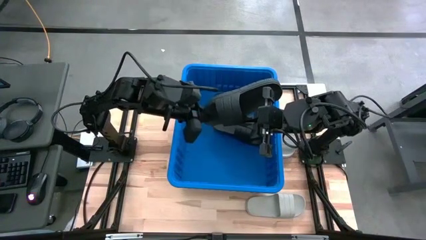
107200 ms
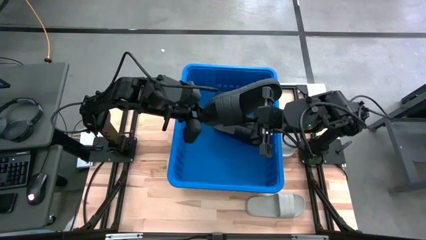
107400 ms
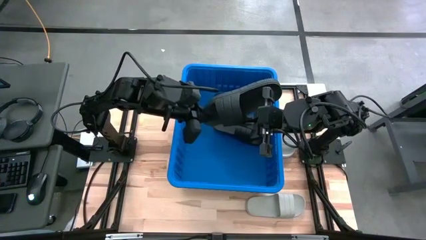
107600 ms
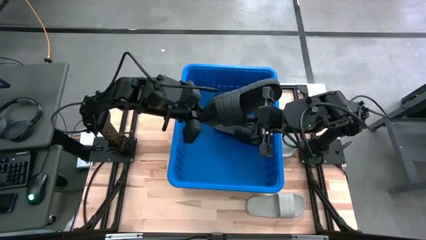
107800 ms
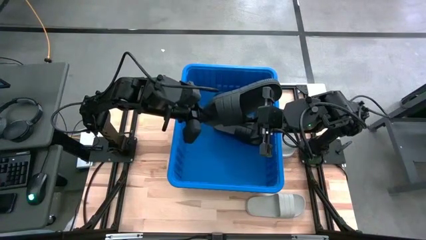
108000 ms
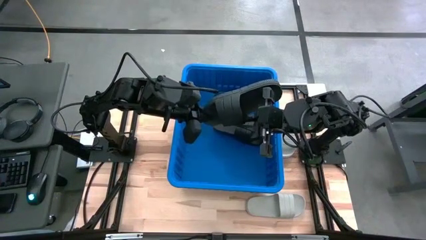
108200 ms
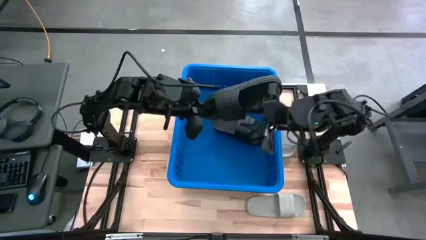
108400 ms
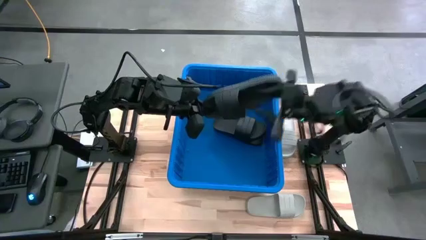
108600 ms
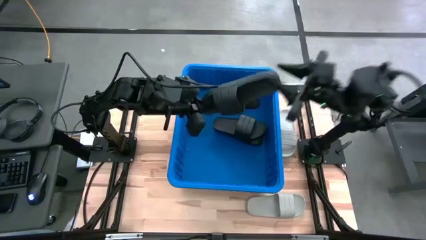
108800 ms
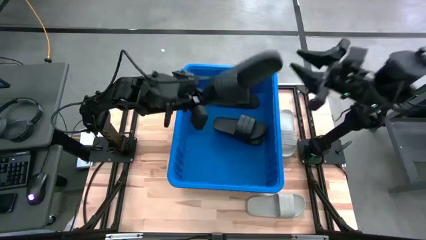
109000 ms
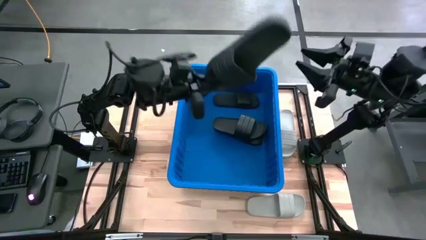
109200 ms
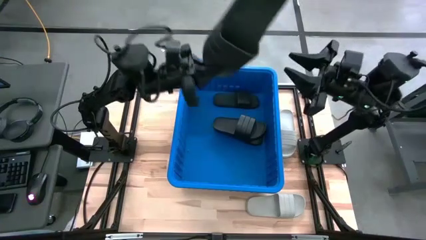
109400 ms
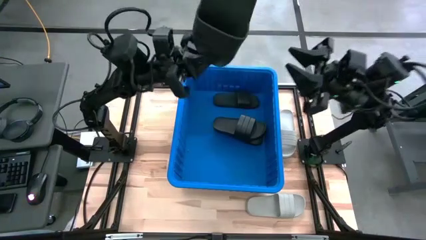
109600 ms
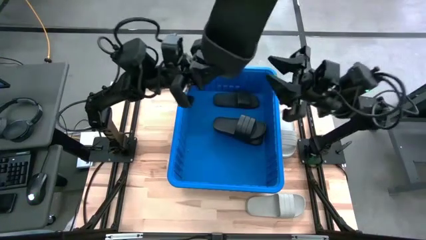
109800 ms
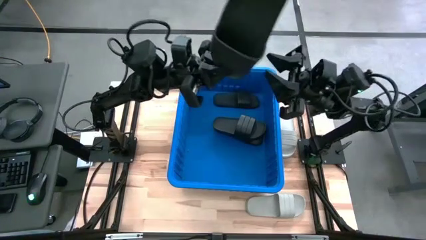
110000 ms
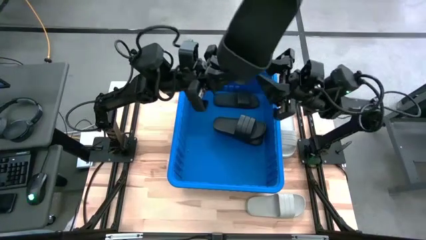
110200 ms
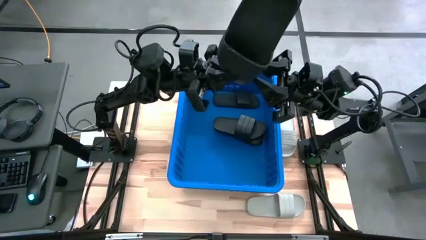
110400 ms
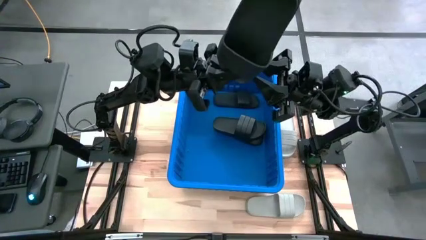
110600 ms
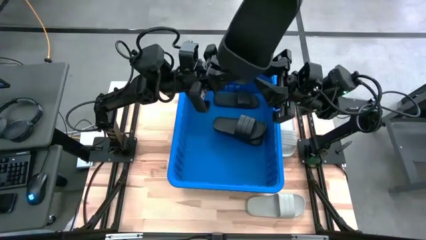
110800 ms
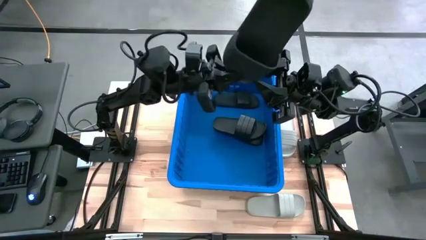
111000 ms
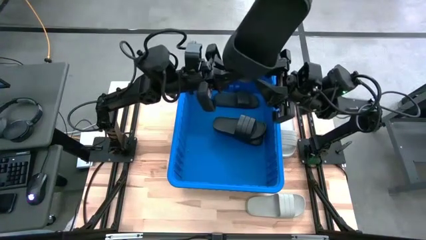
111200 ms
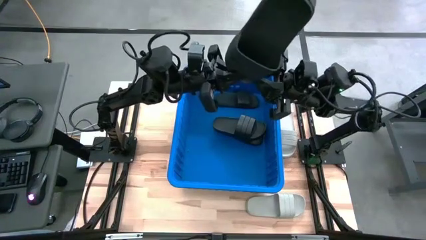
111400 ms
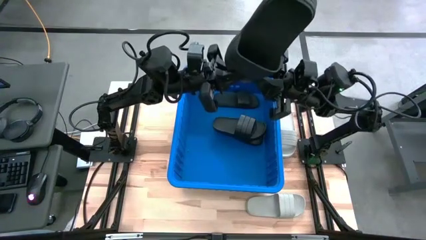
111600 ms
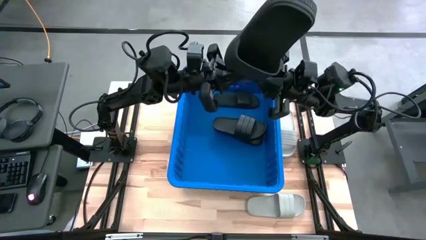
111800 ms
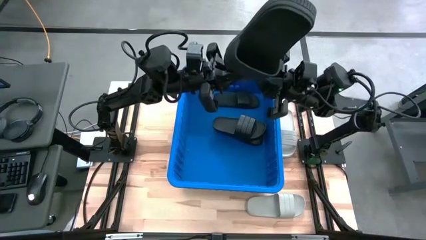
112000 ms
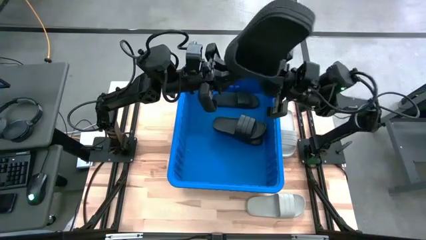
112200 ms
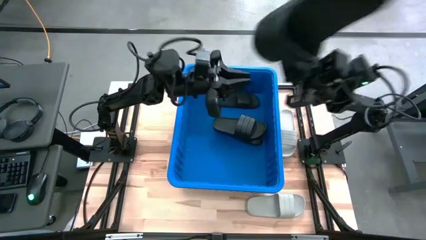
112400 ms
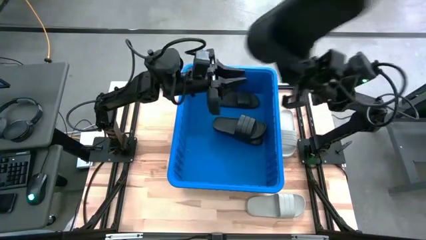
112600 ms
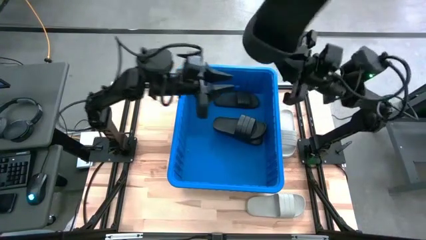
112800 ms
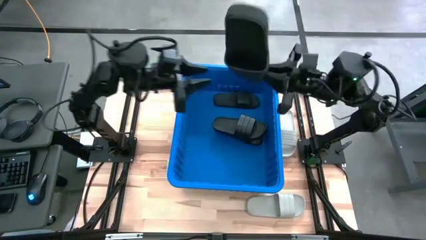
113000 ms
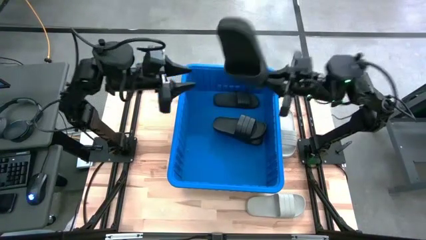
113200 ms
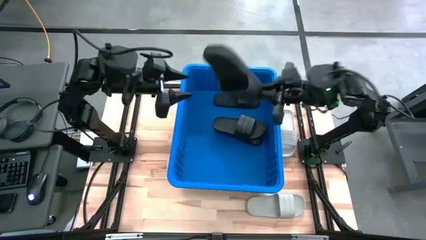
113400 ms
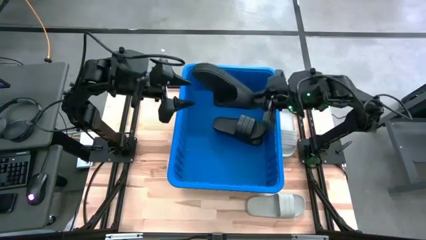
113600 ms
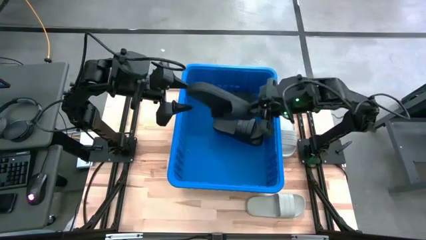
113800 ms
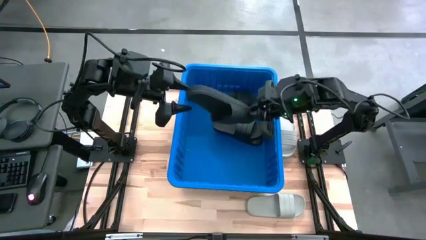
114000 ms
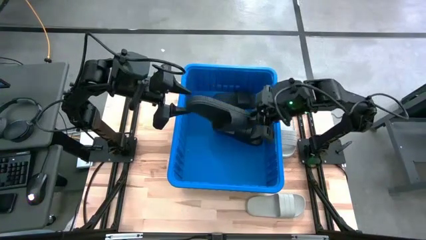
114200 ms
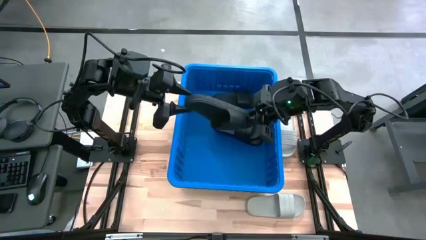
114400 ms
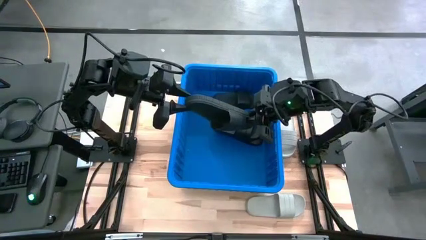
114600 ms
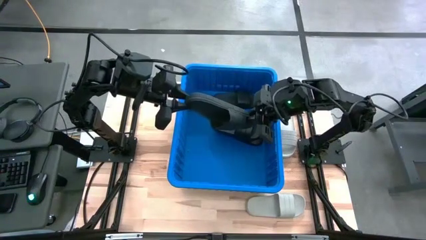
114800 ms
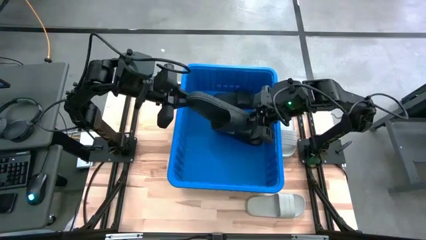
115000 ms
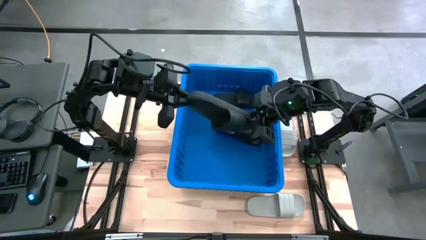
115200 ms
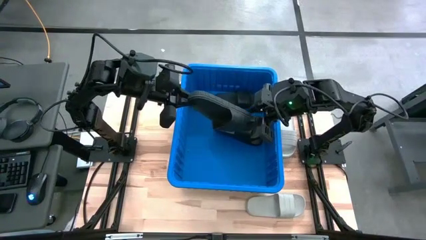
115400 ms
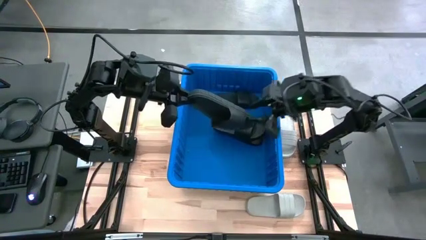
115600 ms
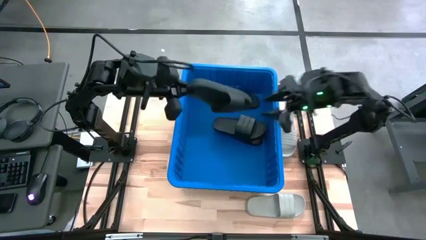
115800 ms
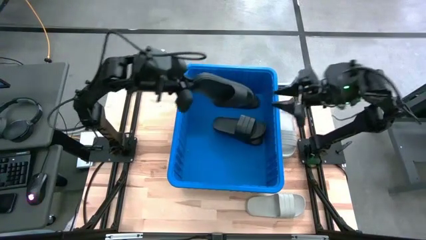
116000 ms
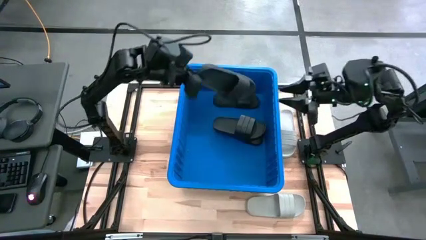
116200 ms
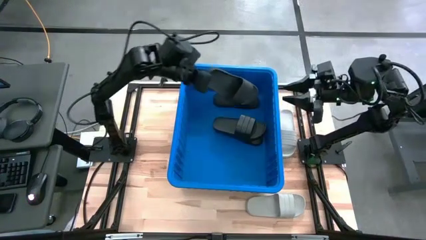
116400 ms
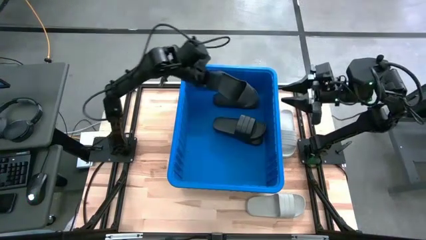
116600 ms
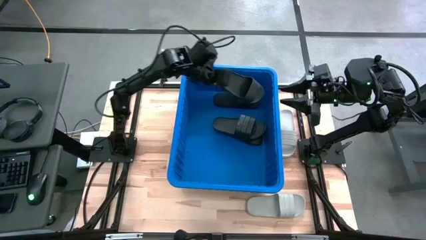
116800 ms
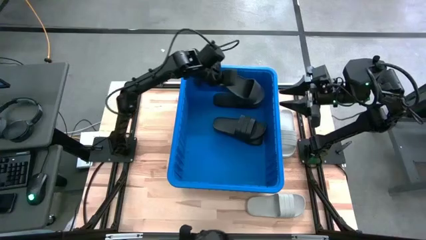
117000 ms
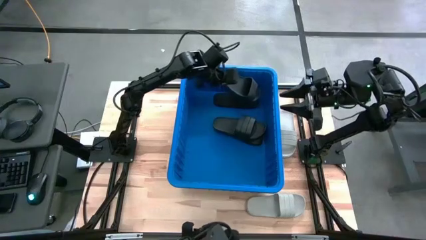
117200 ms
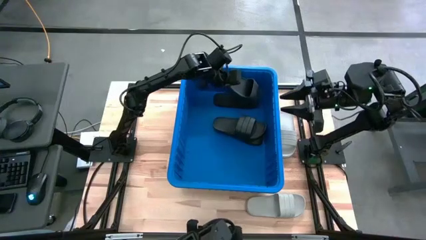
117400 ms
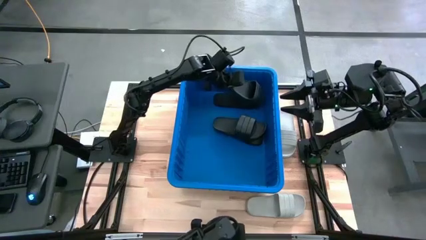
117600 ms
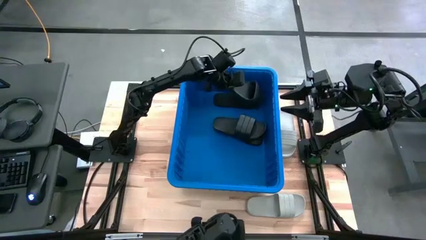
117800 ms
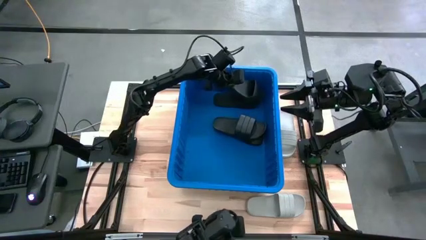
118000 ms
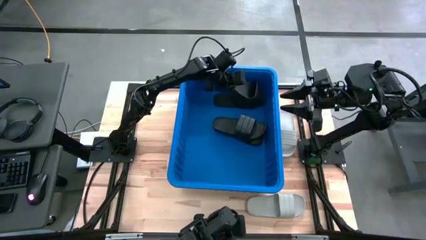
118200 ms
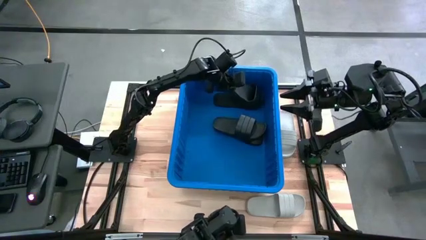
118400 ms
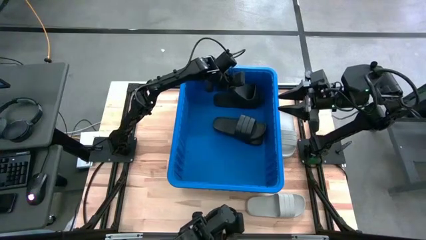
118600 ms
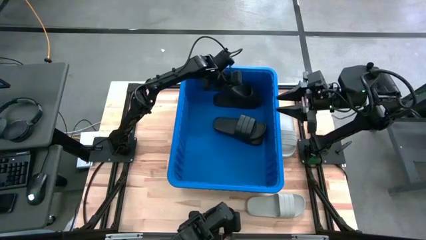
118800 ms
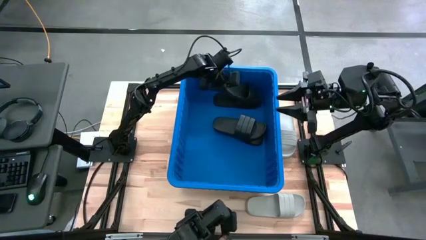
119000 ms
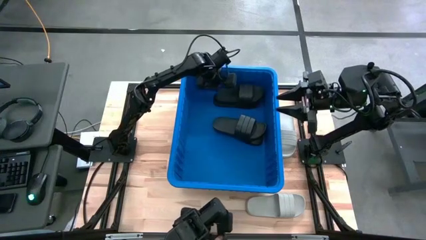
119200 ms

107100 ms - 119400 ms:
Task: Pick and place slides into bin
Stack the black slipper on the top black slipper in the blue bin

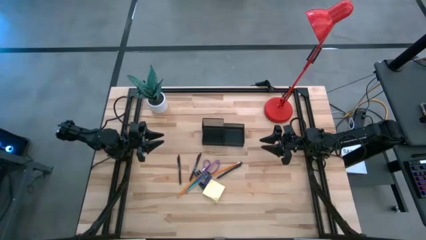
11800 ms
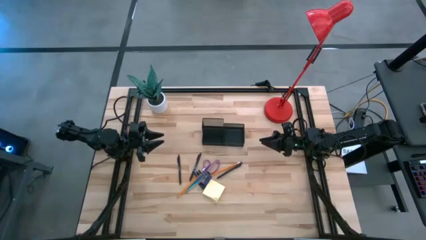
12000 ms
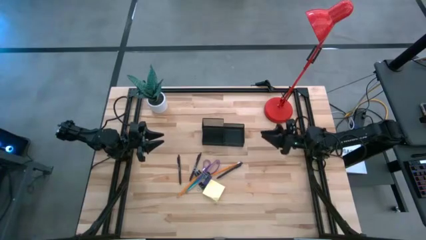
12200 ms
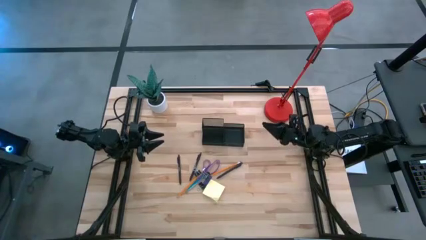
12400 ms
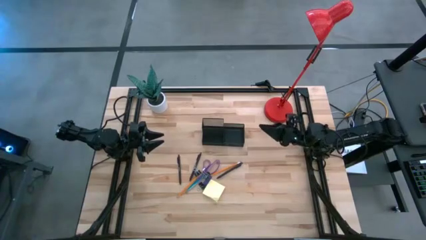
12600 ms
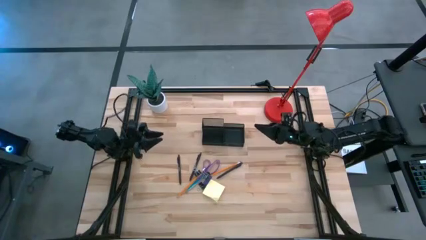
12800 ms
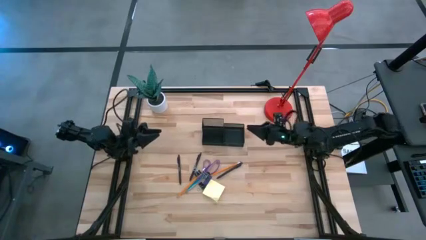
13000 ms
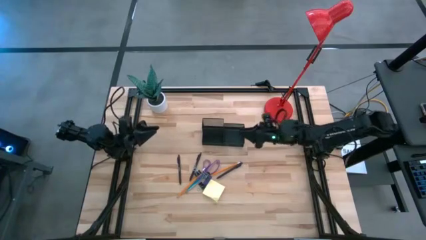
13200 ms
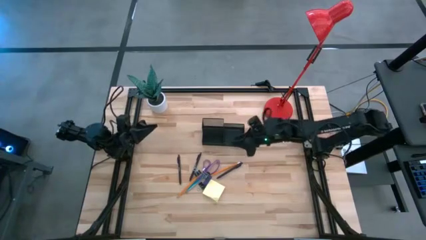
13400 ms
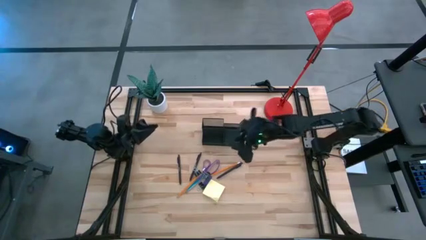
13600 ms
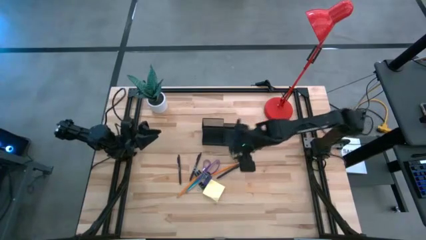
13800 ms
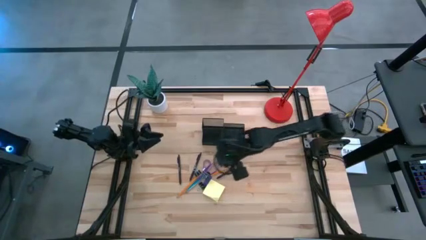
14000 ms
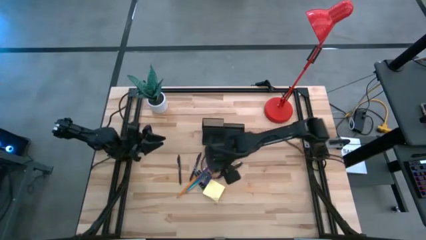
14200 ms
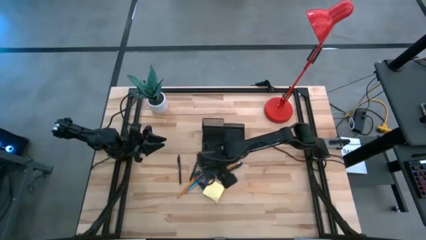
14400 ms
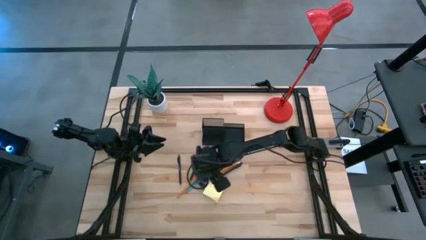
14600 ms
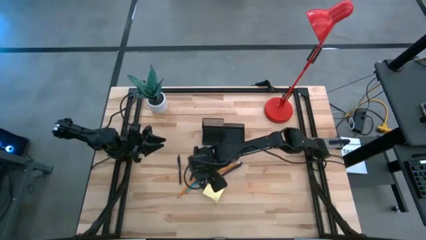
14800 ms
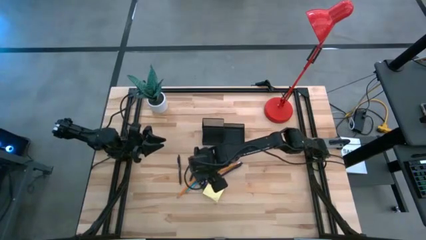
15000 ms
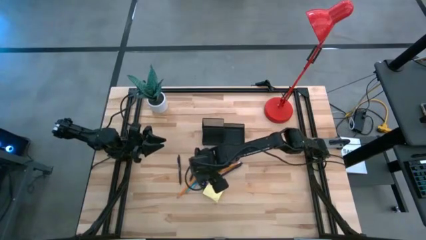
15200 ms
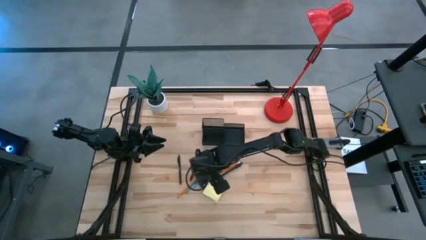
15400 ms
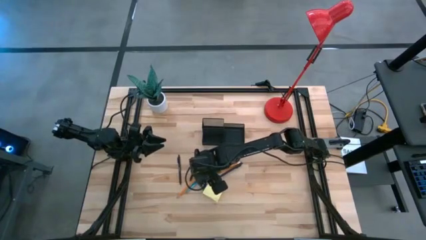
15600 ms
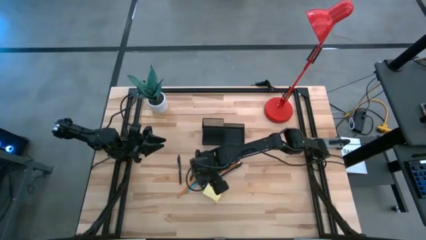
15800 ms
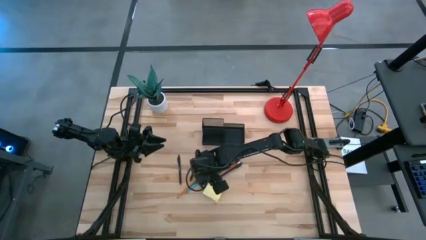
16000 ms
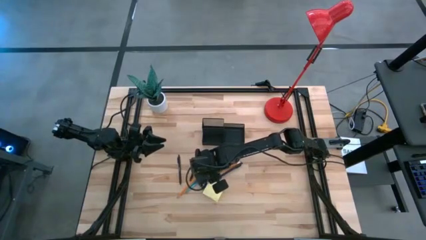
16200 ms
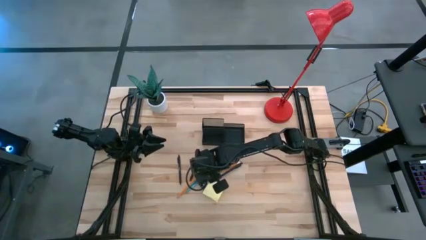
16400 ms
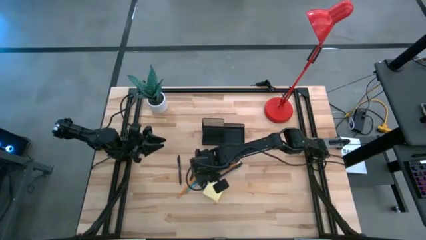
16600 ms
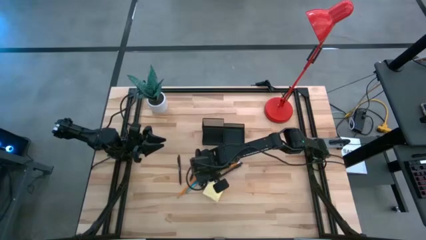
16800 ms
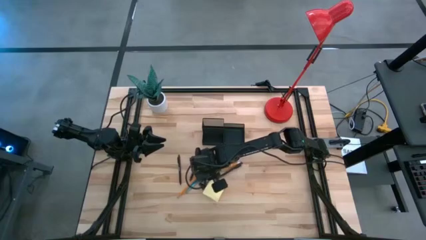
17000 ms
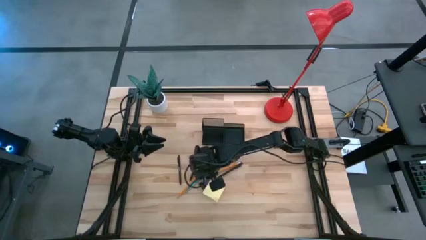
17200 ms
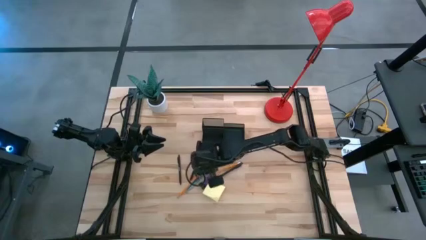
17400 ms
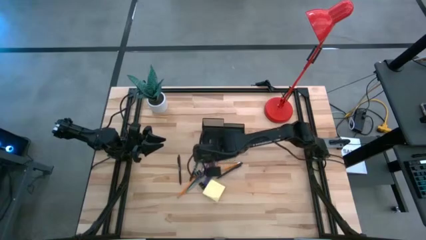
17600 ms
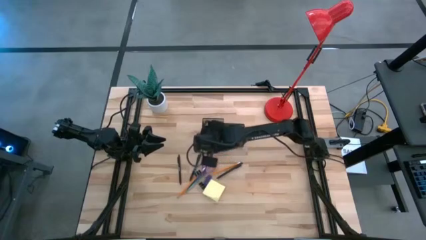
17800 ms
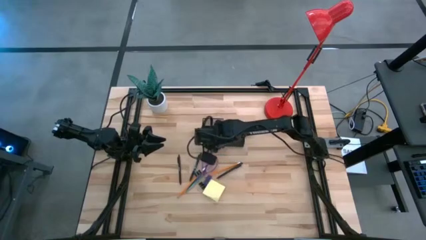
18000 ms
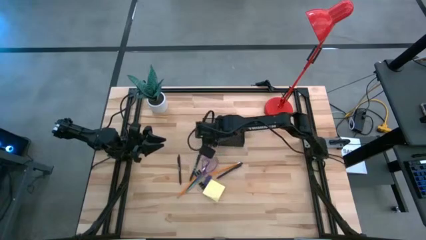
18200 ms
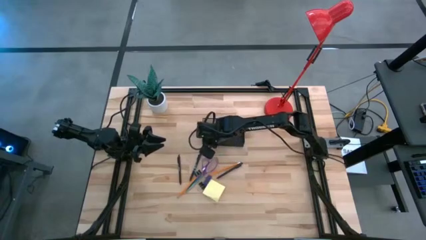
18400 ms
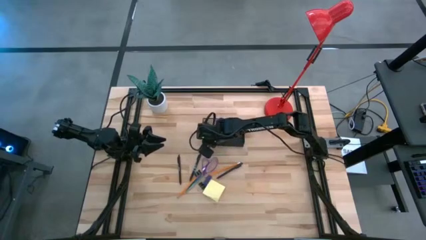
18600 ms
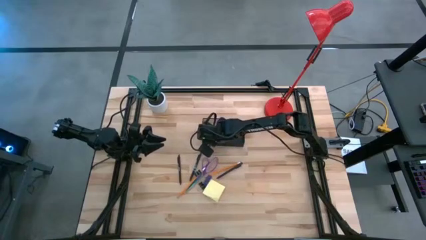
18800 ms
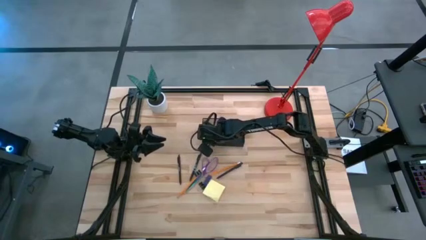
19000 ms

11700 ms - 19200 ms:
Task: Pick and place office supplies into organizer
Put the middle black binder clip into the black desk organizer
